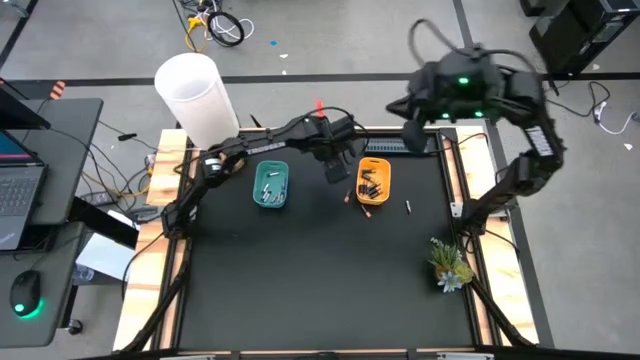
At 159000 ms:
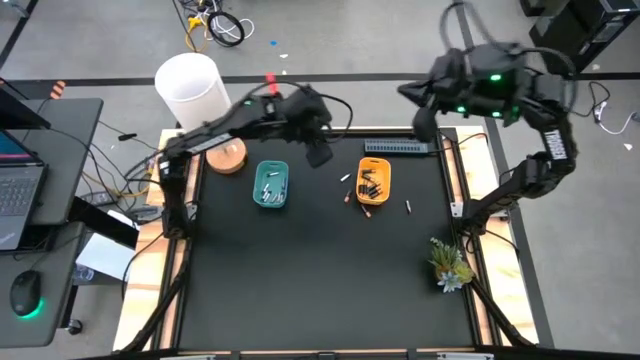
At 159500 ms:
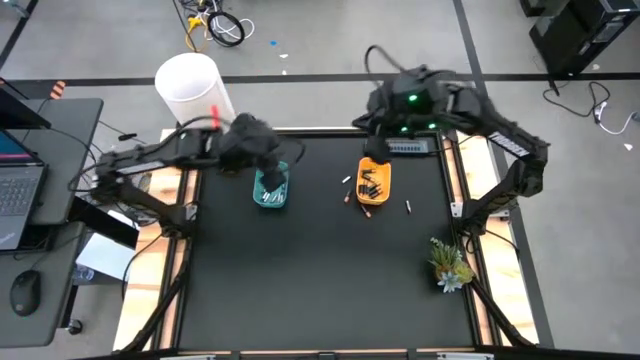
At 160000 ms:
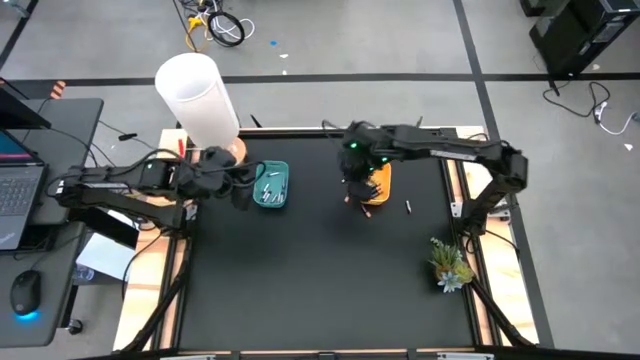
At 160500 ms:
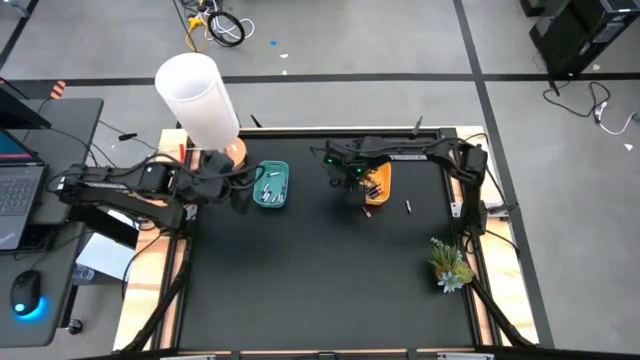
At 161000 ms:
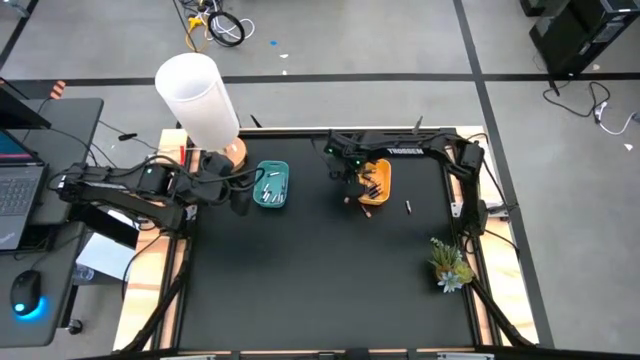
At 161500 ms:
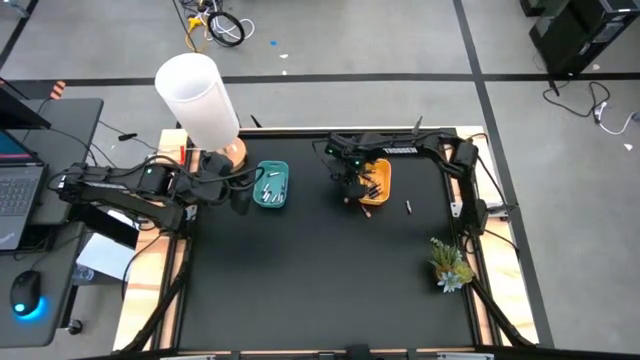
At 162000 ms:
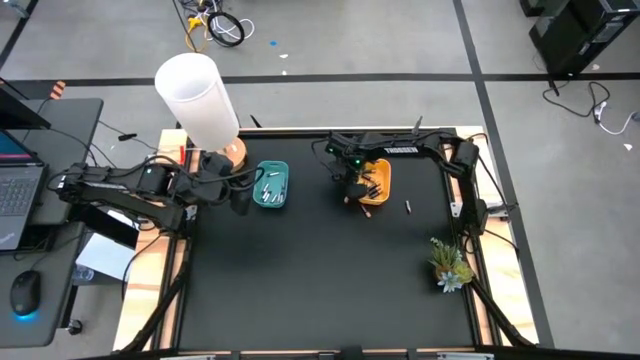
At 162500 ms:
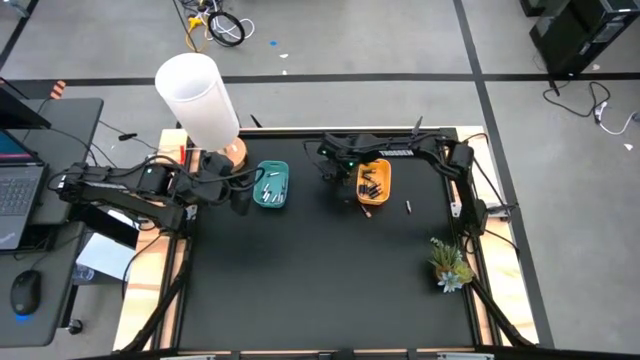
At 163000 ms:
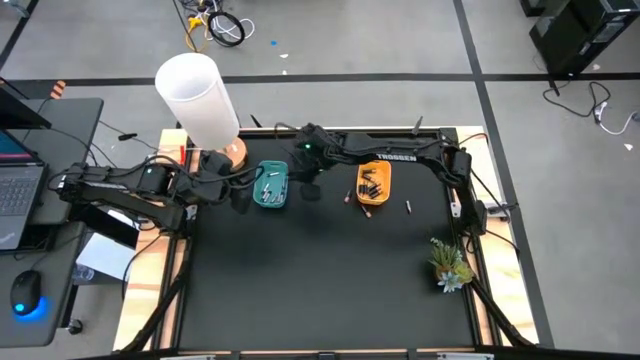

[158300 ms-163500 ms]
Task: Sort batteries
Put the silver battery into the blue bin

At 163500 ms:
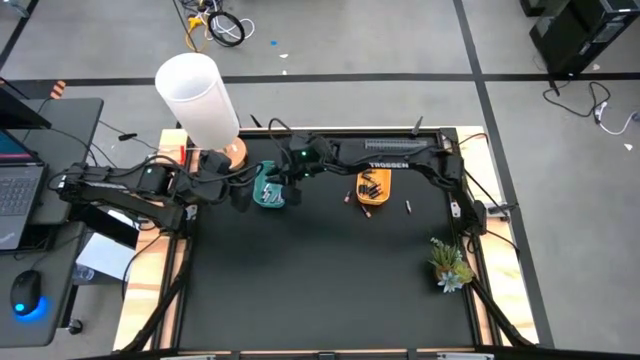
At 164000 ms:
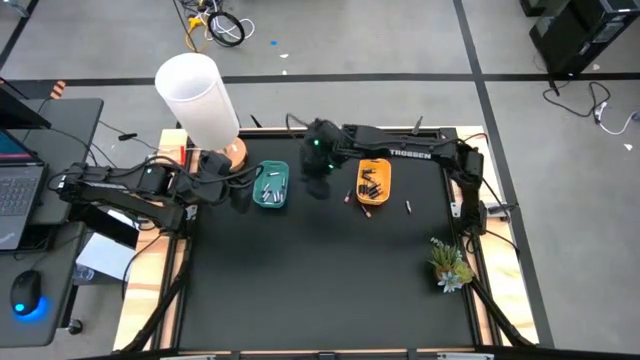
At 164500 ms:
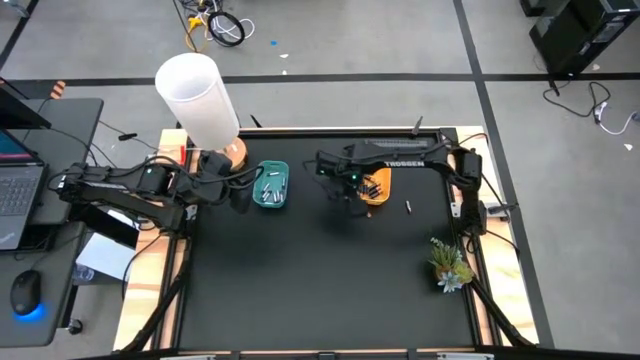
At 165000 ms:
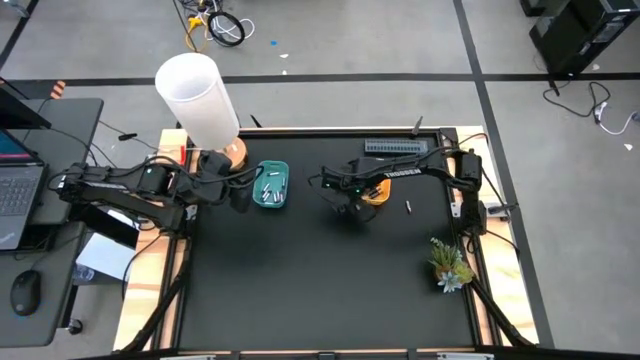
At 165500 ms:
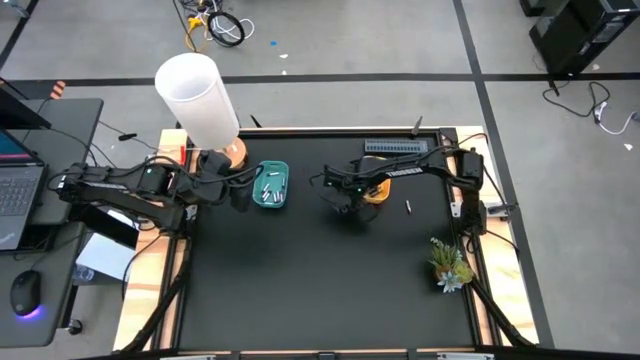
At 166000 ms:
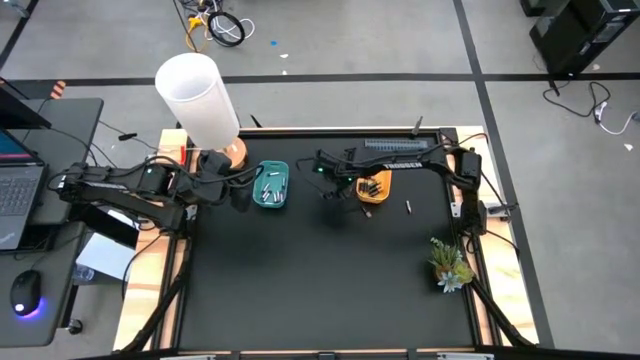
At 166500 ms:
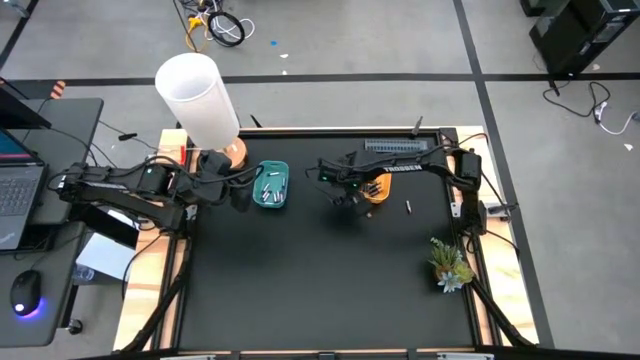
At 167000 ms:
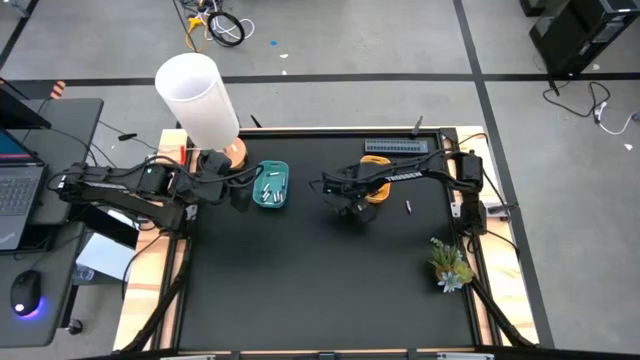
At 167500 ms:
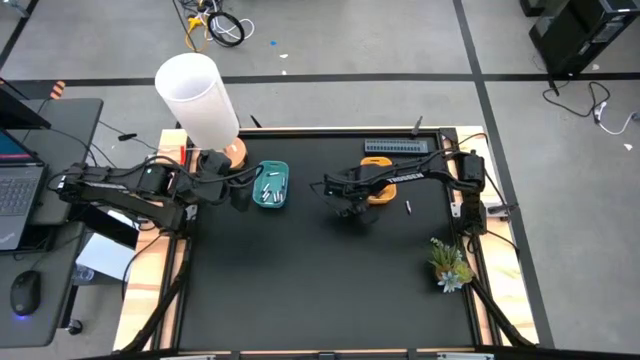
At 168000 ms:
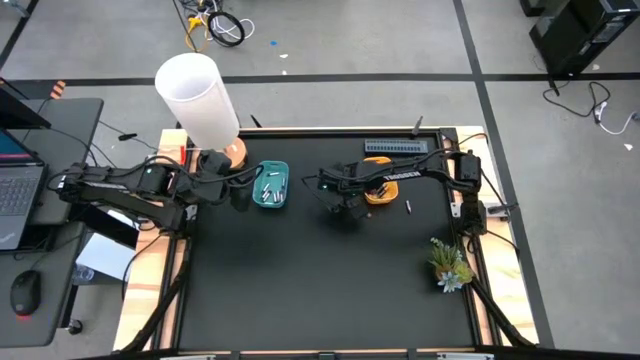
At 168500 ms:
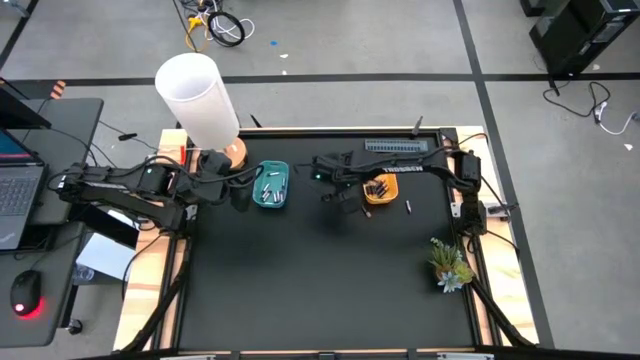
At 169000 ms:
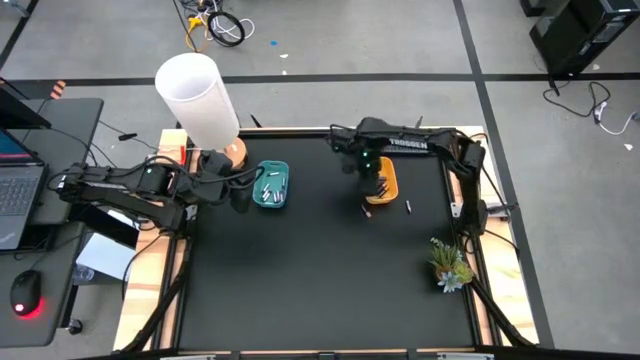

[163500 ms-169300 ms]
Put the black battery into the yellow bin

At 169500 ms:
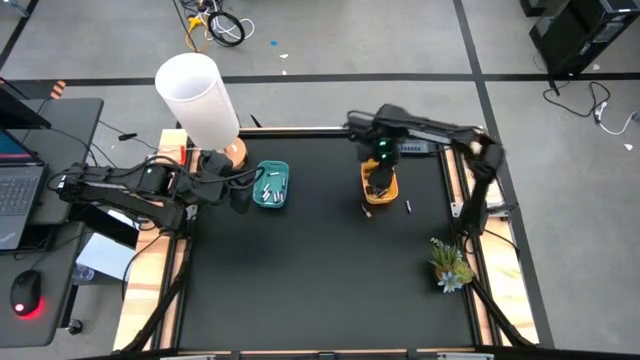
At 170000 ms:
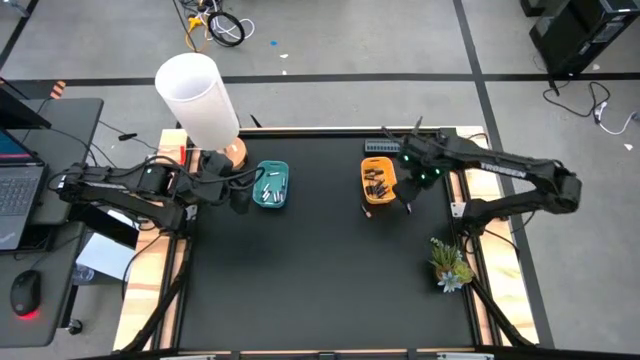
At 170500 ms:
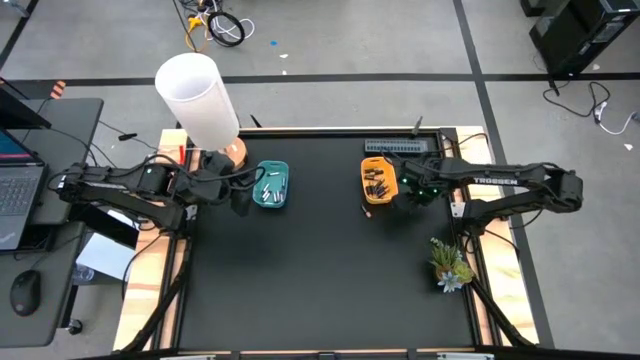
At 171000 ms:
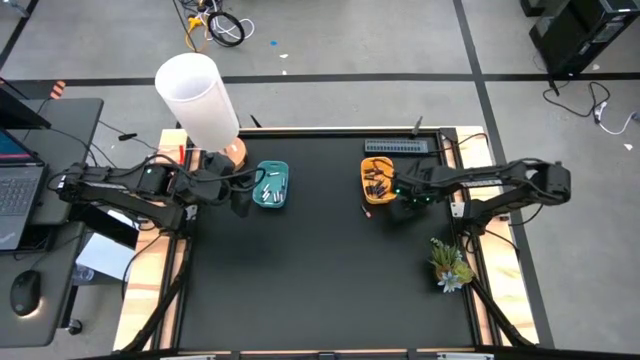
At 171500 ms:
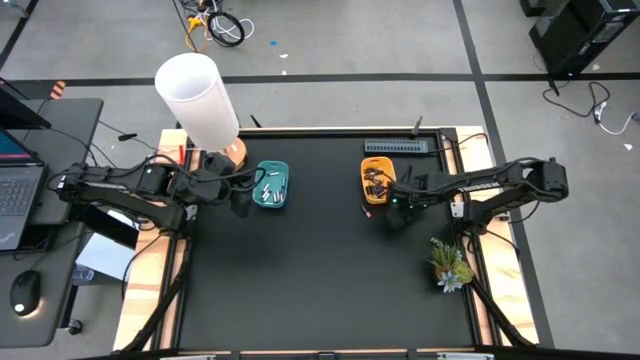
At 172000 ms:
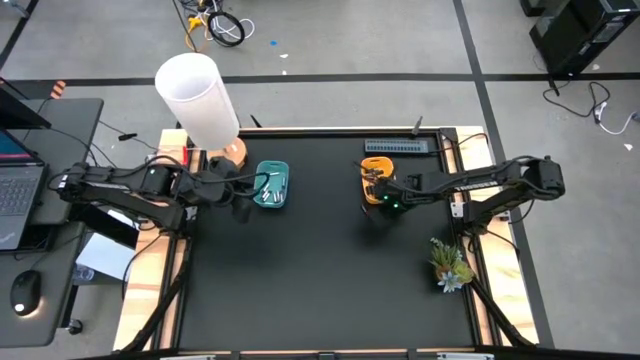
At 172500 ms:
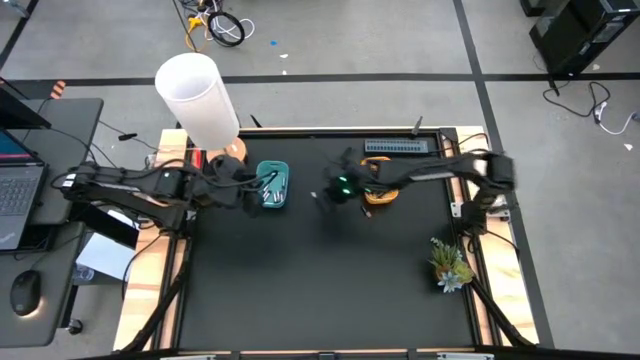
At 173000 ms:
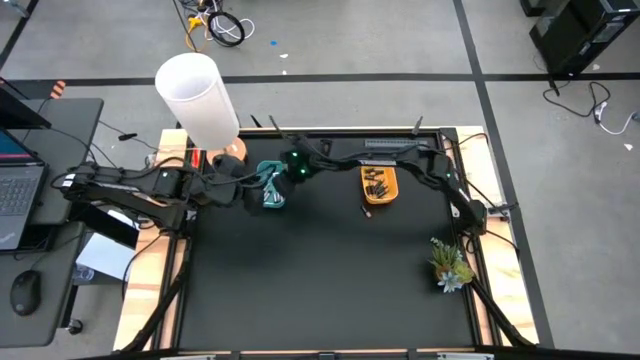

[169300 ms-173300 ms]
Put the silver battery into the blue bin

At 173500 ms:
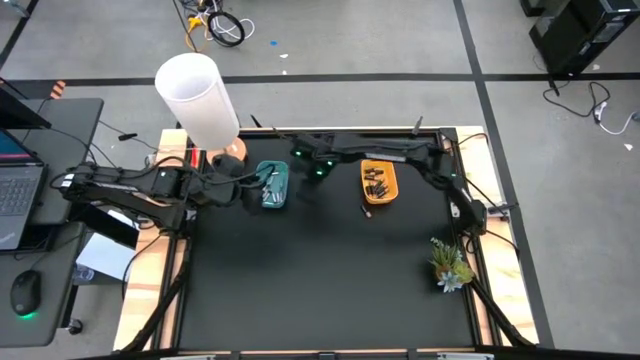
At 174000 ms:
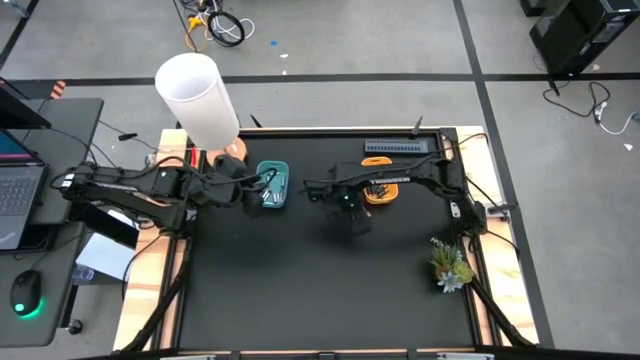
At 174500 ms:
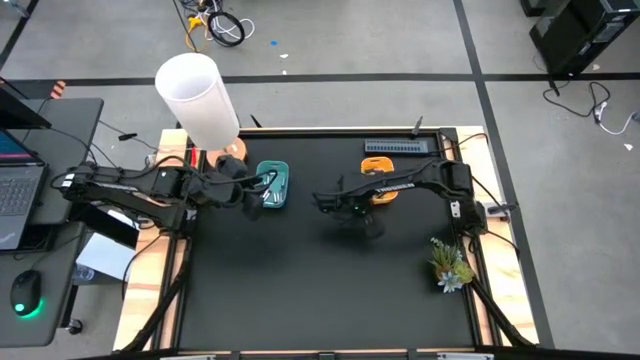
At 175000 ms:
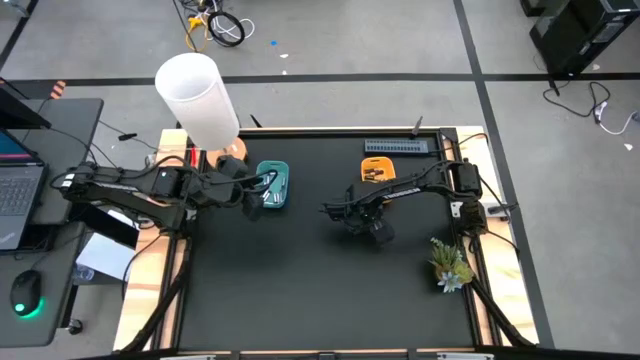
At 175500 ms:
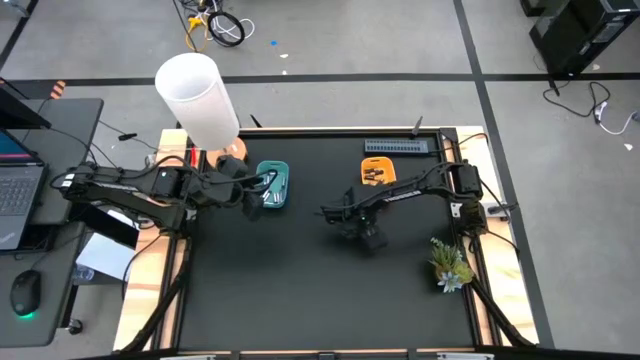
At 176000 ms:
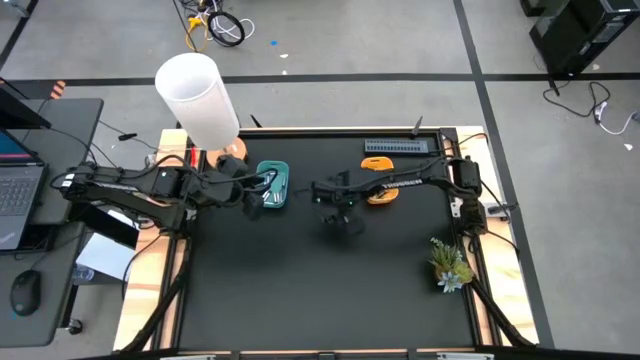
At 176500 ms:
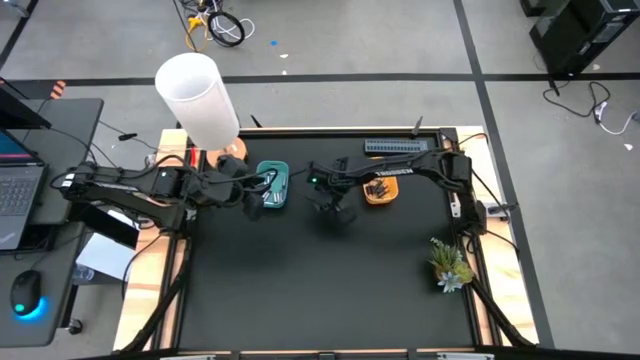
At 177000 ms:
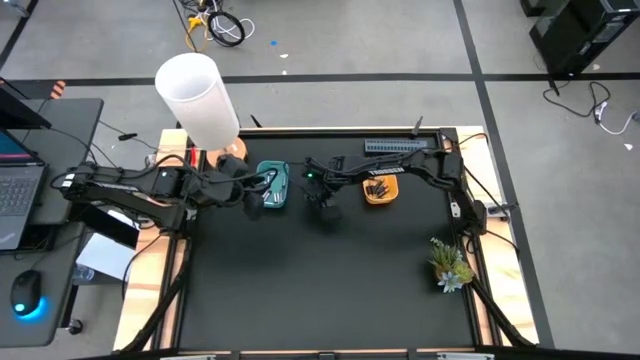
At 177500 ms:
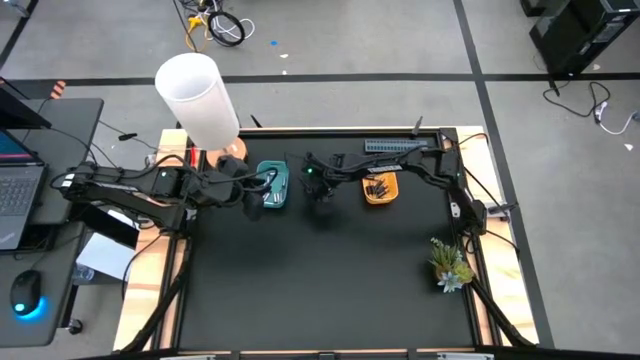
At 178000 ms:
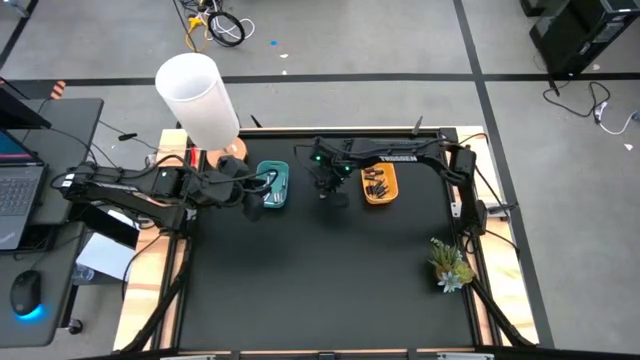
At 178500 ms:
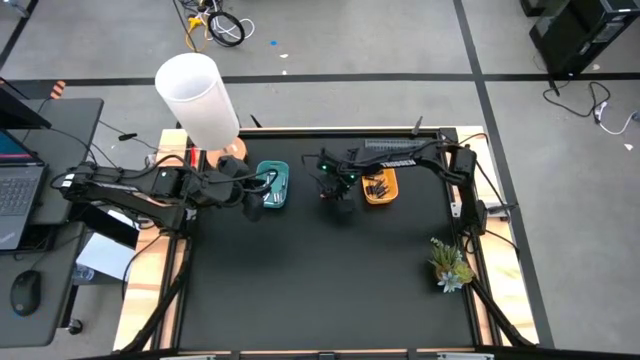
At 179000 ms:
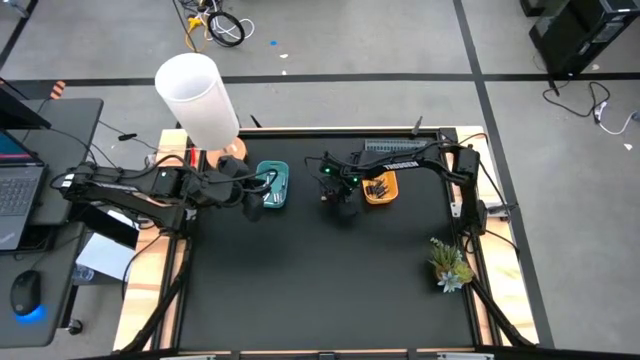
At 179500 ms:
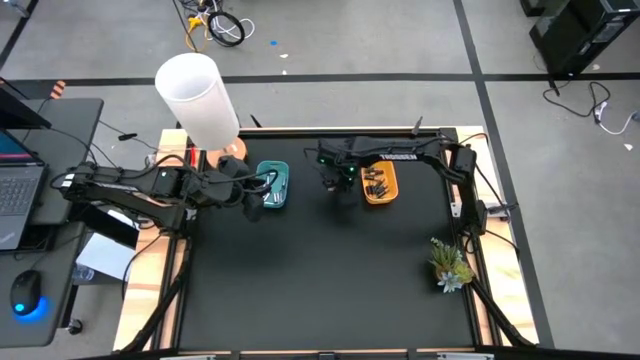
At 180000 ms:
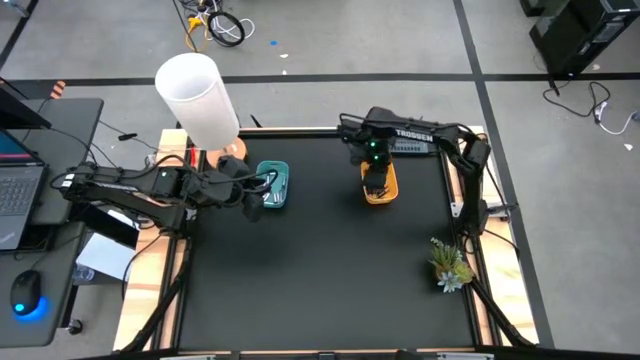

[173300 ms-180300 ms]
Put the black battery into the yellow bin
